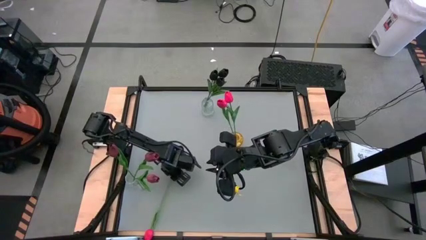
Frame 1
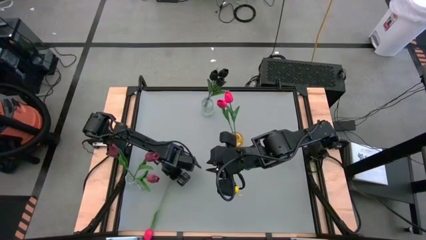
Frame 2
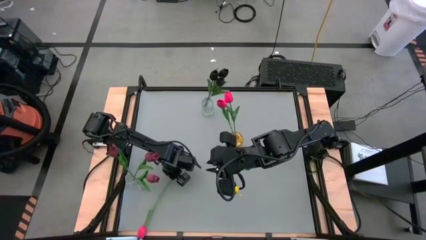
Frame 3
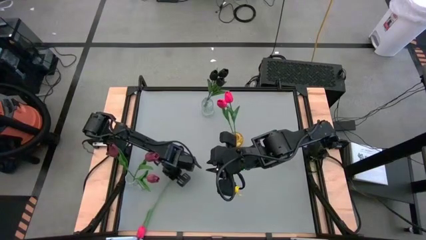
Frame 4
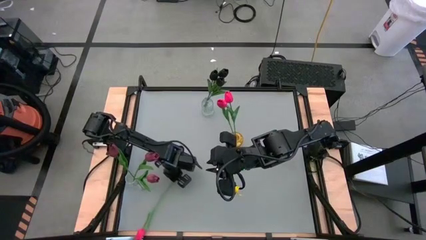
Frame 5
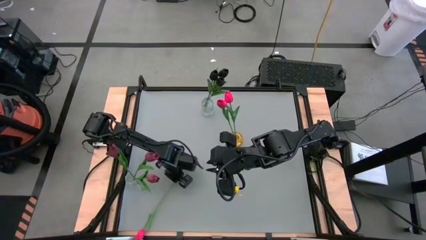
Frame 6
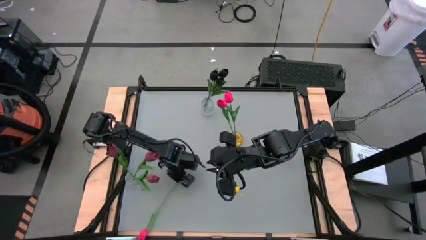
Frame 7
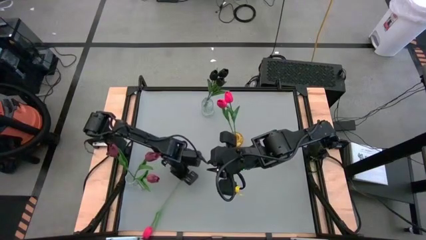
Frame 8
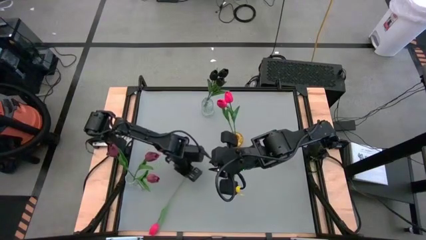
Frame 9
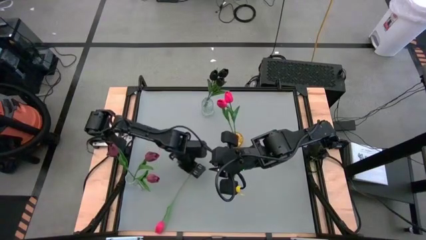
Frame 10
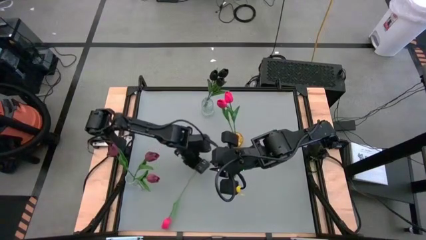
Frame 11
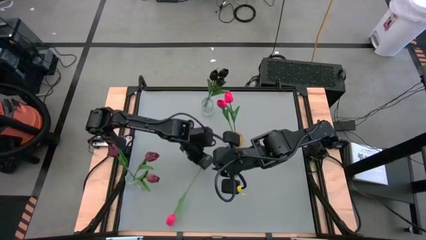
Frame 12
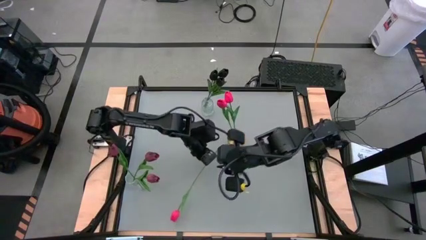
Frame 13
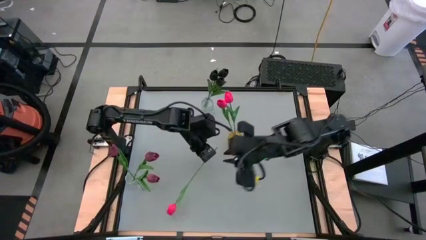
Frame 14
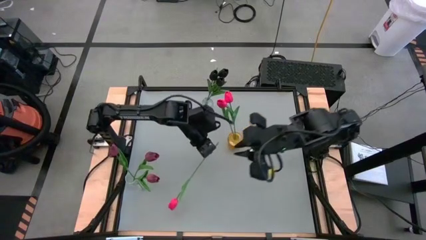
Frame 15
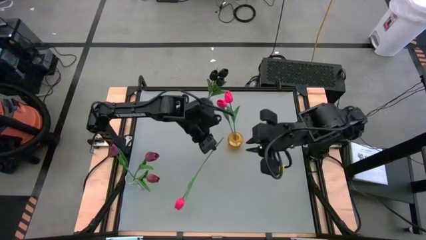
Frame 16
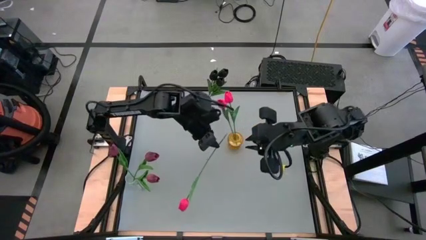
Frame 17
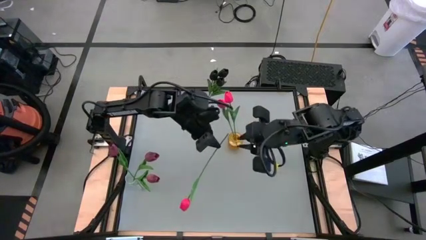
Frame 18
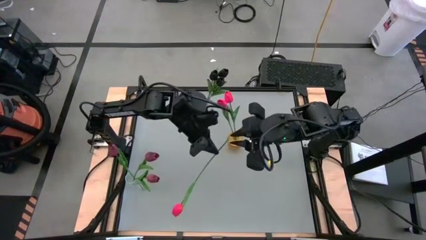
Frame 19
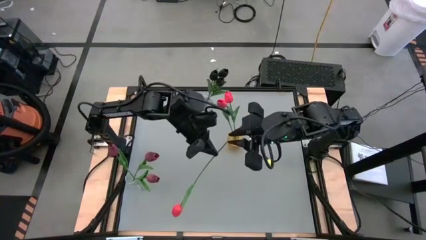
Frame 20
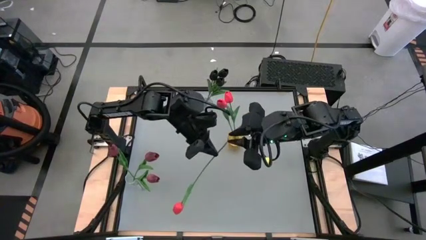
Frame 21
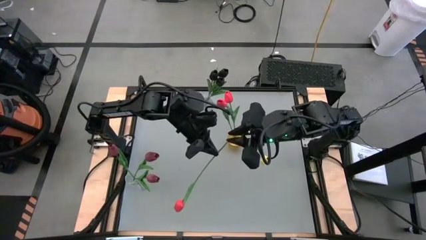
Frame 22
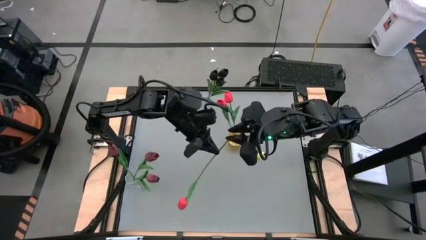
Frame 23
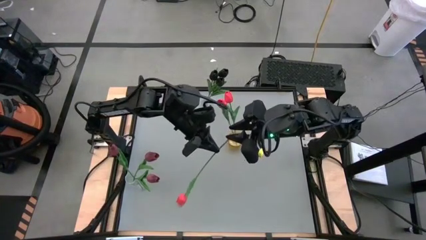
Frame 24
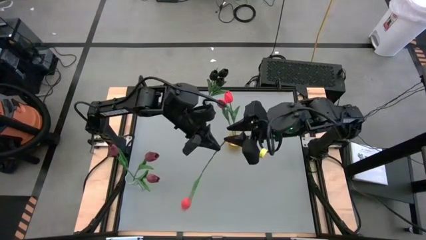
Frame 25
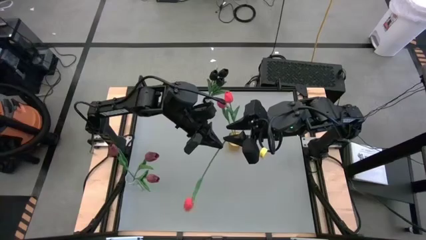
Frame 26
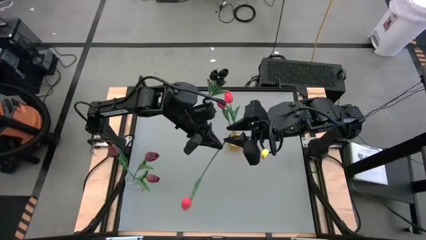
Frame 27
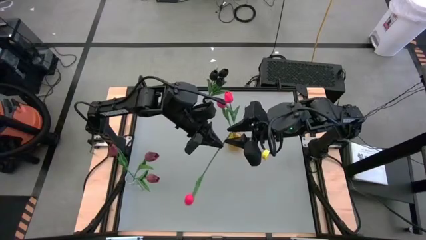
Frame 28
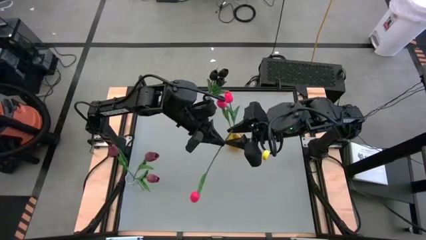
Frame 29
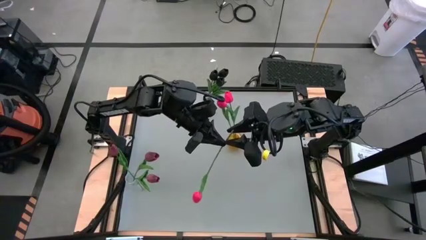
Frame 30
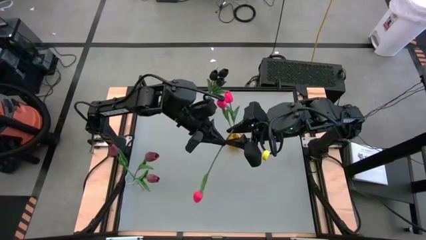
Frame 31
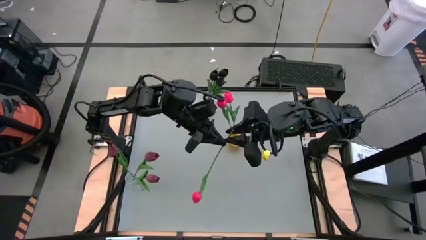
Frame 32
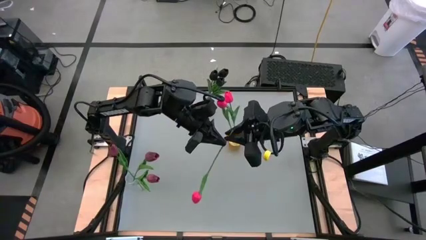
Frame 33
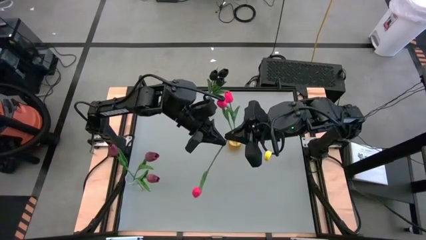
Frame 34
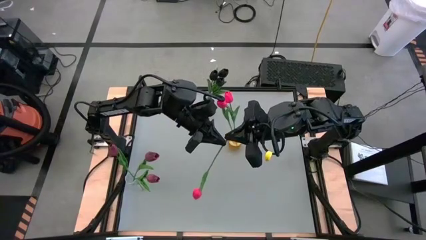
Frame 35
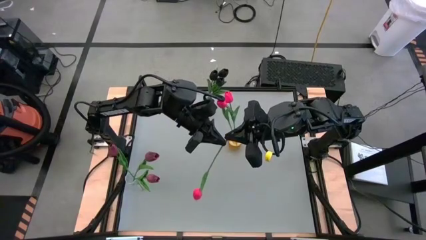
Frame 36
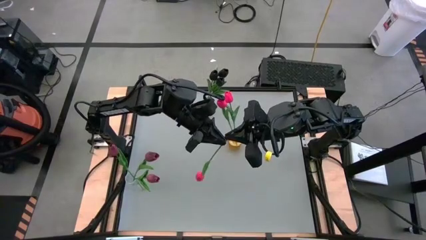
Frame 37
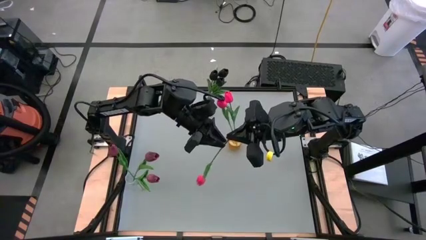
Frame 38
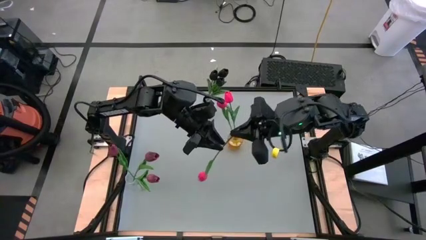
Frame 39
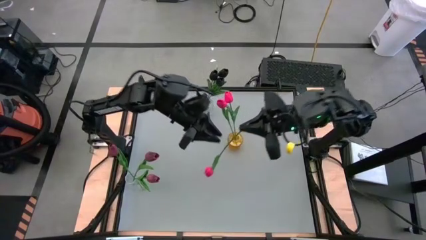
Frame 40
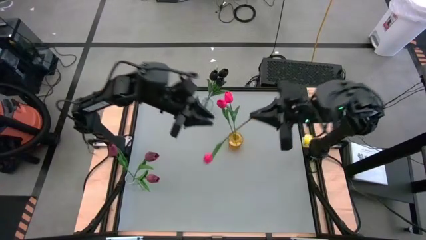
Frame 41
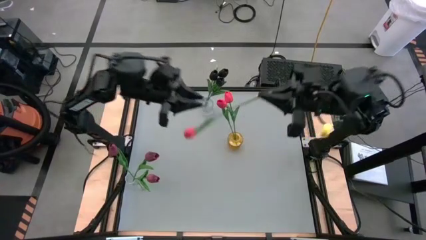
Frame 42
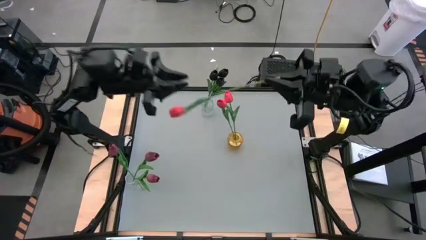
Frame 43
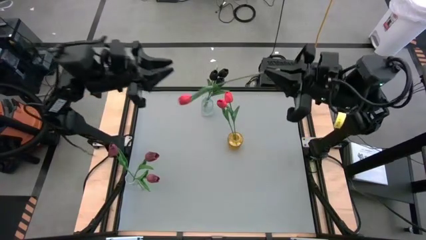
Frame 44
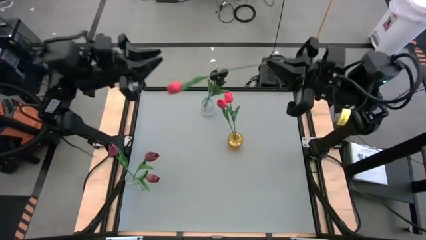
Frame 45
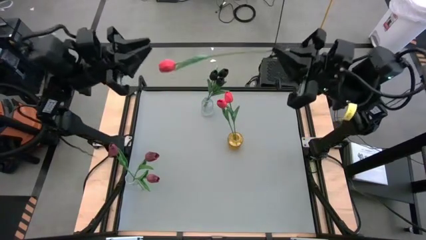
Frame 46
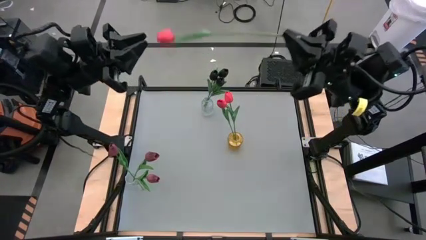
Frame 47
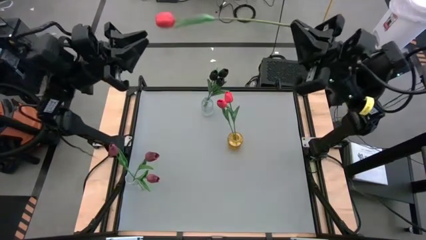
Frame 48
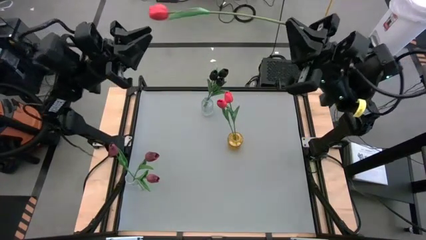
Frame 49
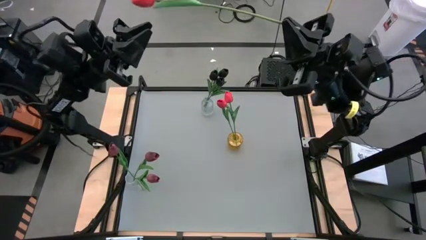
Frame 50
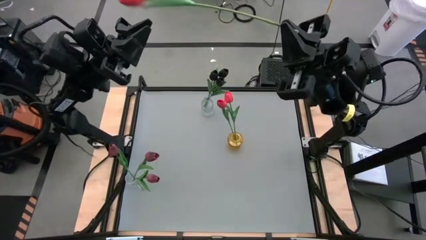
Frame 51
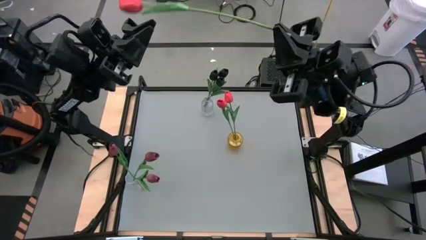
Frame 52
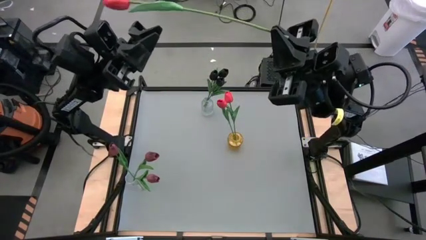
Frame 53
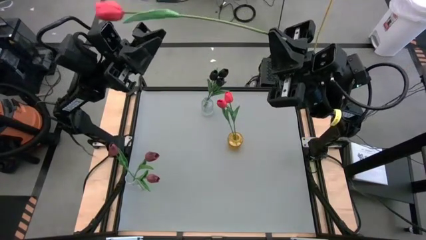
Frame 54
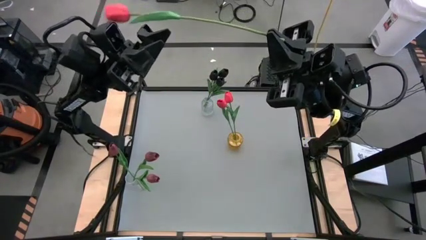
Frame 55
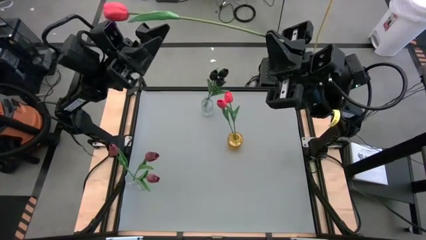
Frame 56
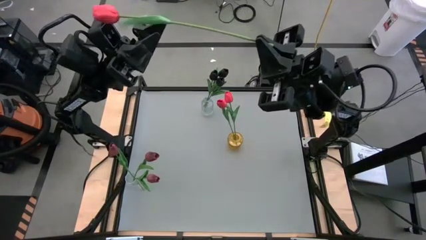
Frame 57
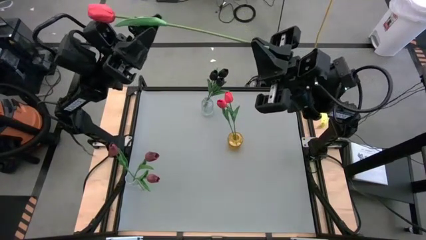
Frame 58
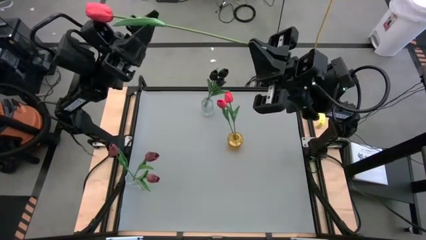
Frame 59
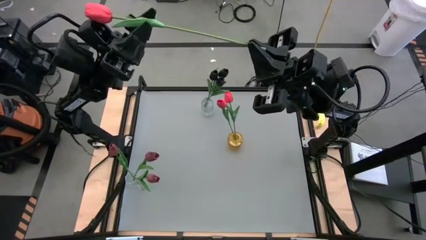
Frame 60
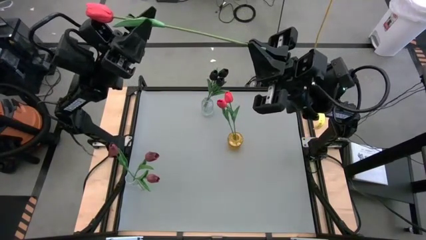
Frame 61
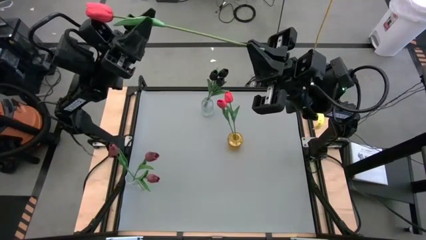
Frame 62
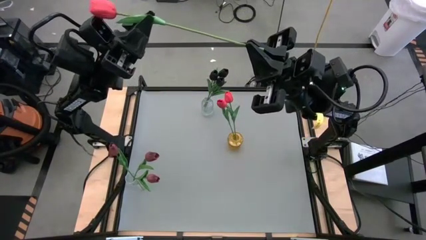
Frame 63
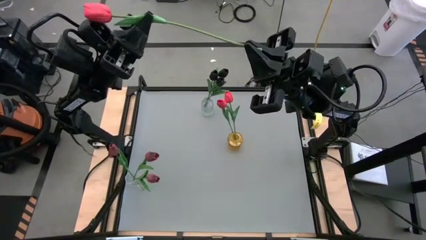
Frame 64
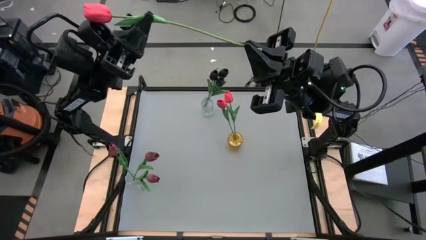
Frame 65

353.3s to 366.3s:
Task: Sort flowers into vase by color
Put the pink tulip into the yellow vase

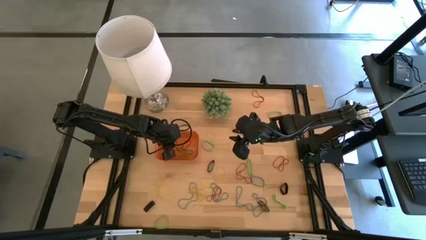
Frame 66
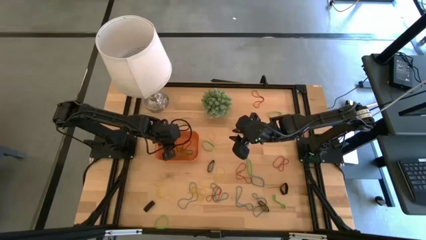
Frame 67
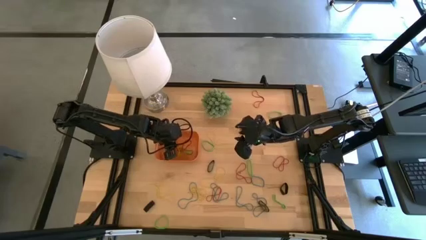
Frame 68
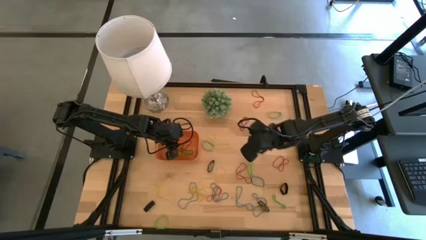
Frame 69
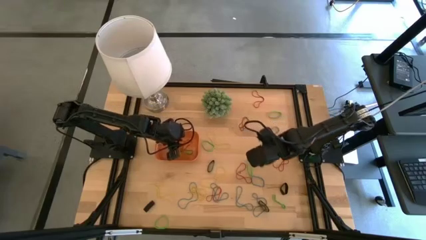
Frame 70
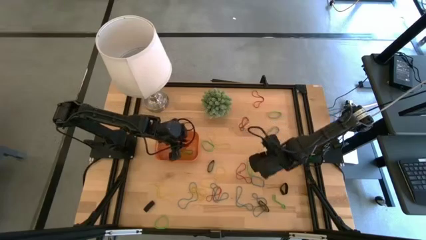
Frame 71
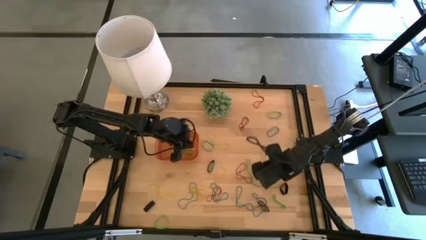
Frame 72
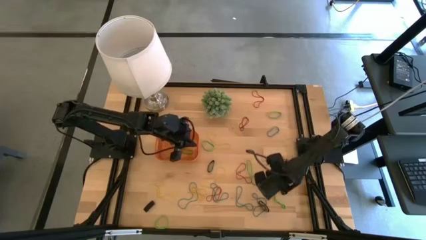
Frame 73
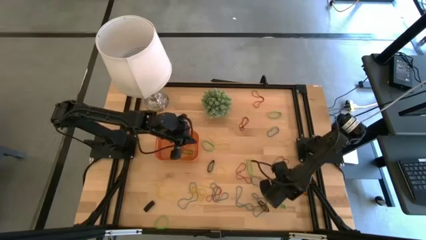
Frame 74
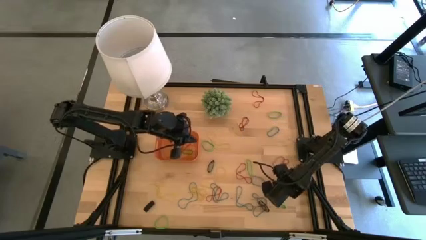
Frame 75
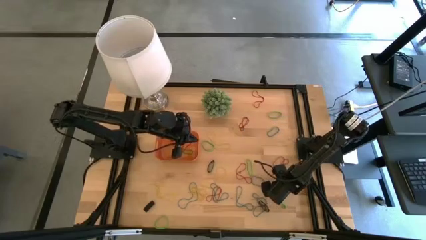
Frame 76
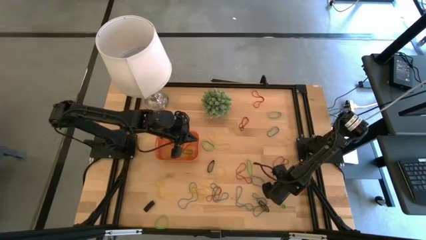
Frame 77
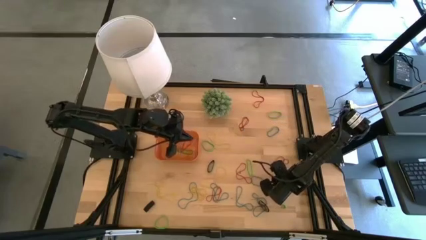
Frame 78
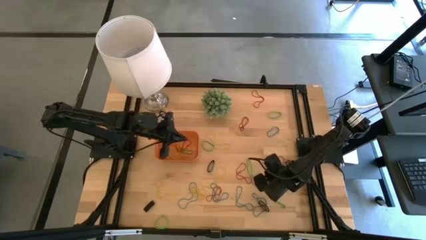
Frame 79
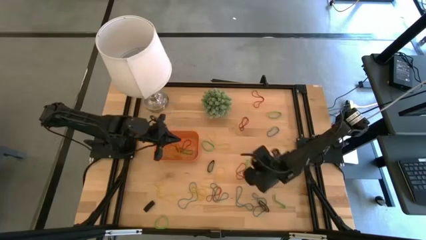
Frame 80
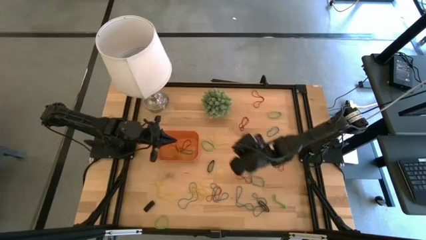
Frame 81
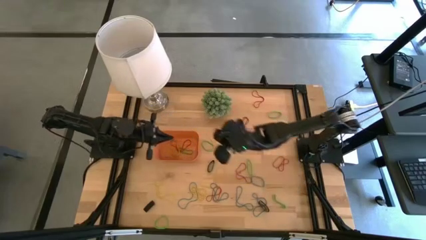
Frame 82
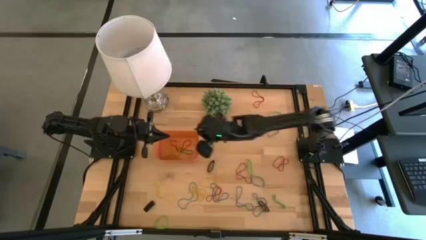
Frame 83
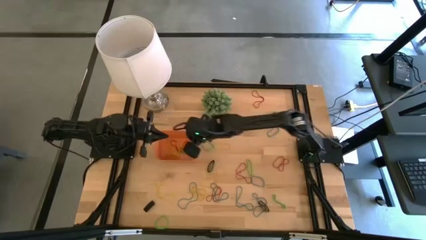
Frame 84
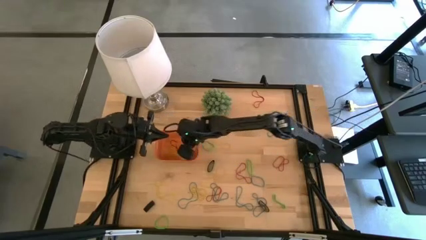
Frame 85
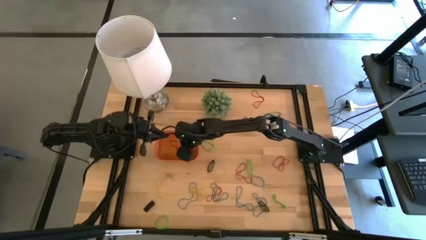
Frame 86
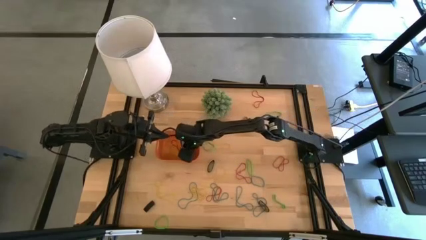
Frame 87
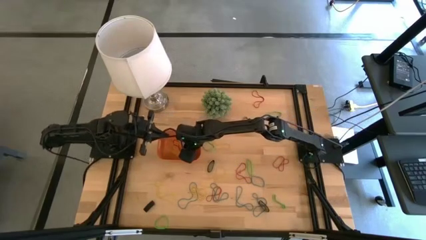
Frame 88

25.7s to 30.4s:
Task: Pick and place rubber bands into bin
Put the black rubber band into the orange bin
